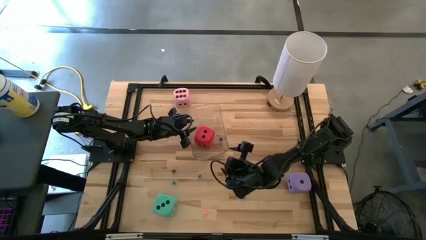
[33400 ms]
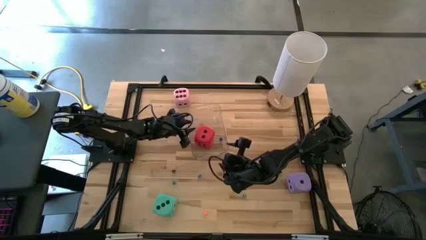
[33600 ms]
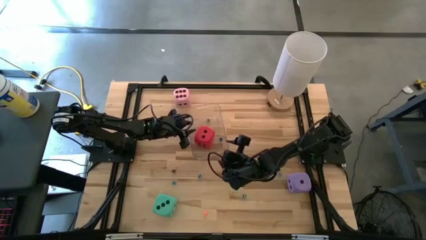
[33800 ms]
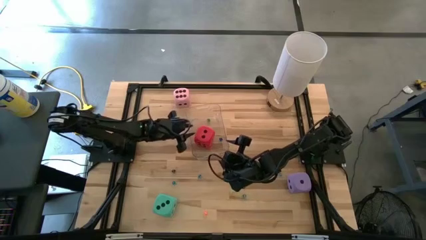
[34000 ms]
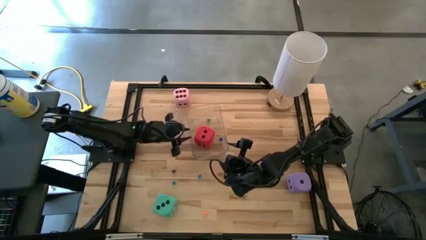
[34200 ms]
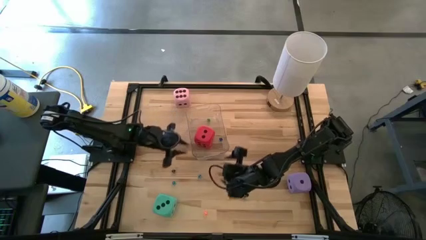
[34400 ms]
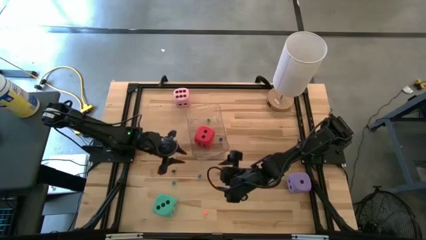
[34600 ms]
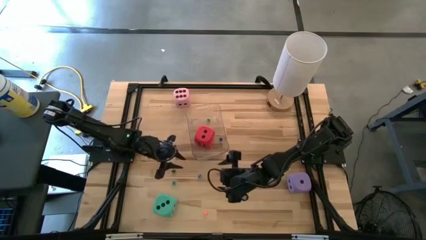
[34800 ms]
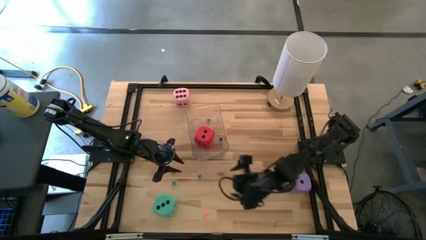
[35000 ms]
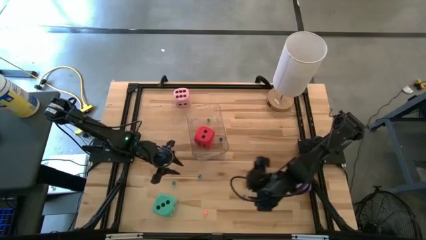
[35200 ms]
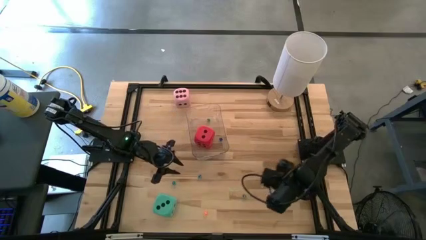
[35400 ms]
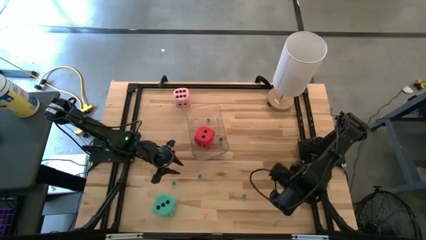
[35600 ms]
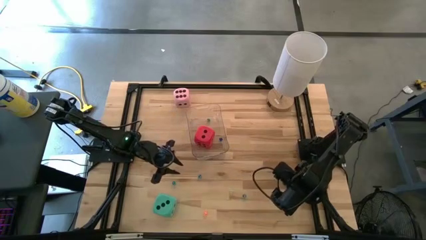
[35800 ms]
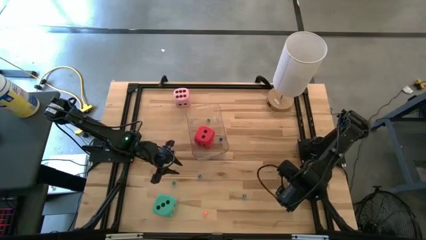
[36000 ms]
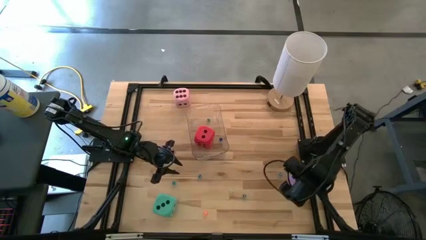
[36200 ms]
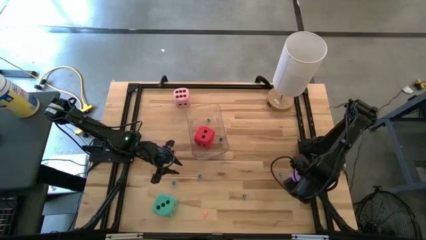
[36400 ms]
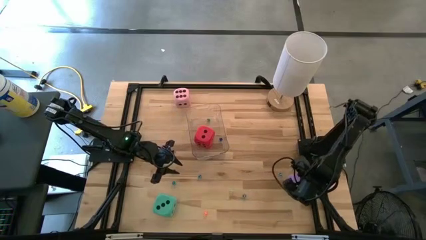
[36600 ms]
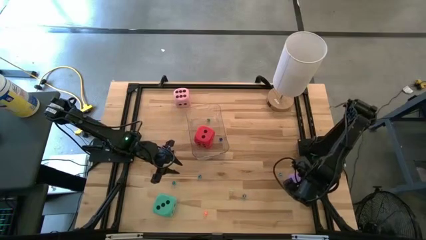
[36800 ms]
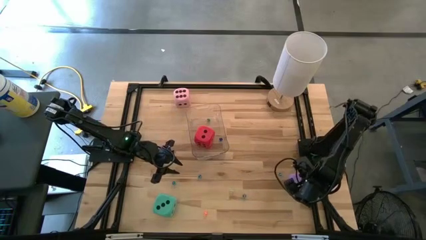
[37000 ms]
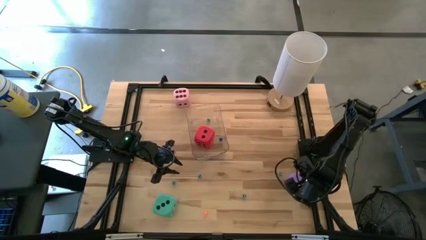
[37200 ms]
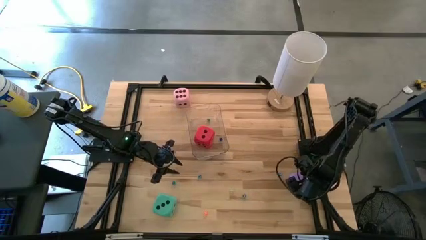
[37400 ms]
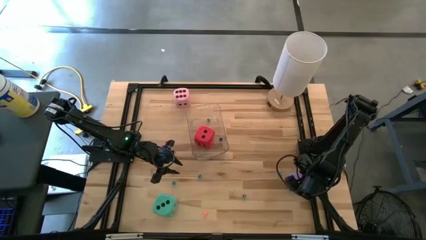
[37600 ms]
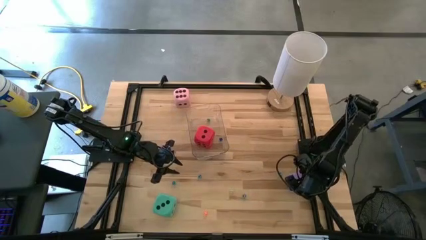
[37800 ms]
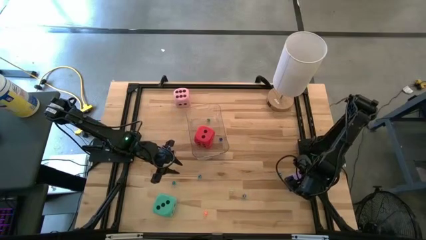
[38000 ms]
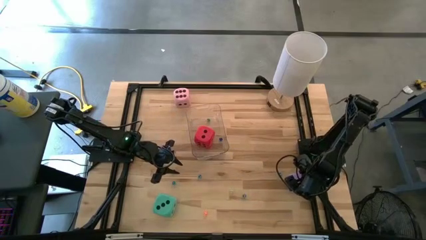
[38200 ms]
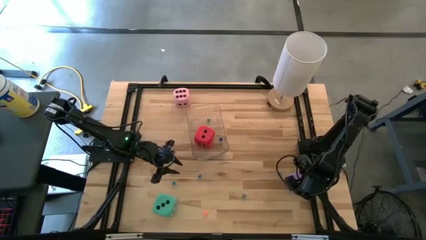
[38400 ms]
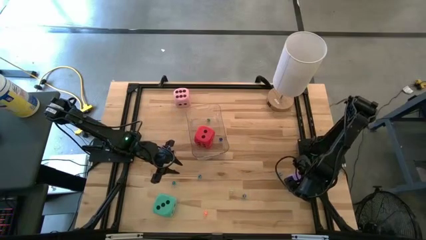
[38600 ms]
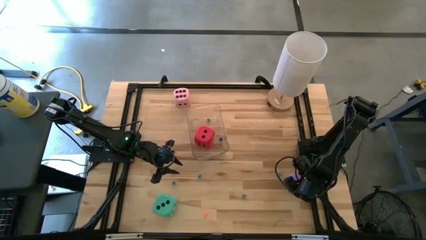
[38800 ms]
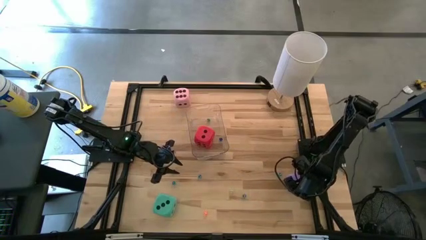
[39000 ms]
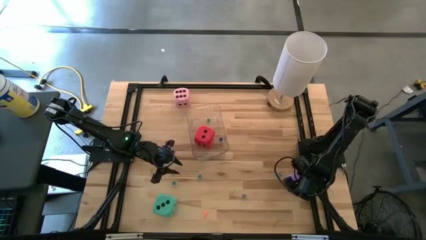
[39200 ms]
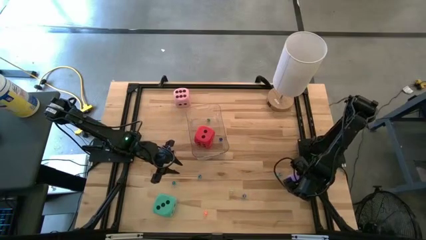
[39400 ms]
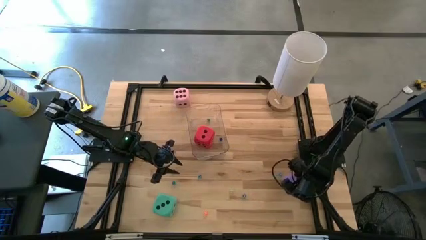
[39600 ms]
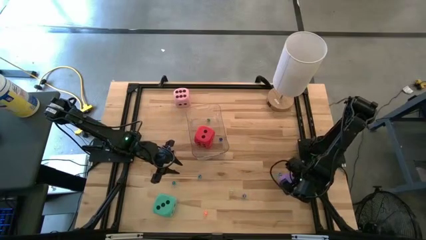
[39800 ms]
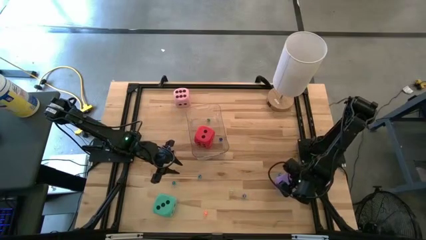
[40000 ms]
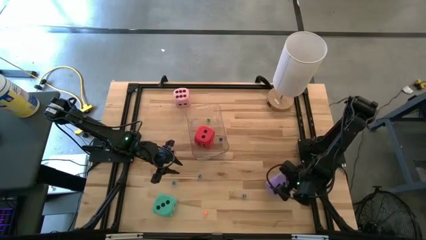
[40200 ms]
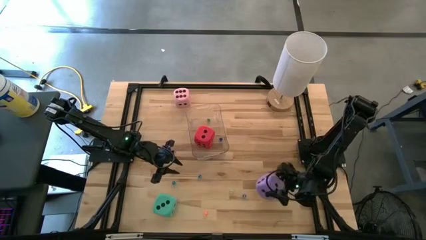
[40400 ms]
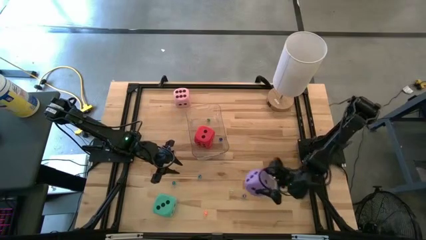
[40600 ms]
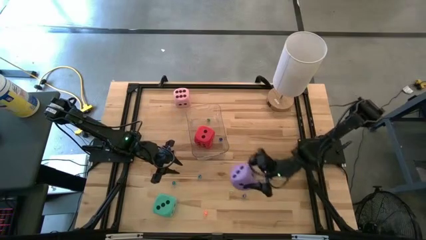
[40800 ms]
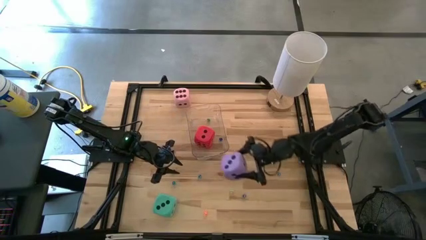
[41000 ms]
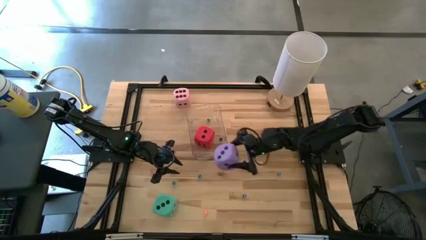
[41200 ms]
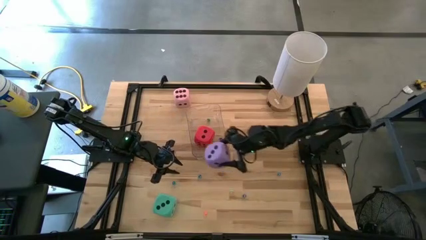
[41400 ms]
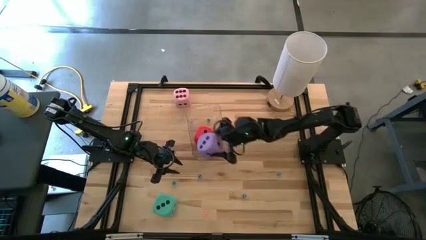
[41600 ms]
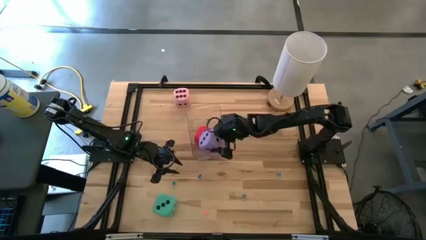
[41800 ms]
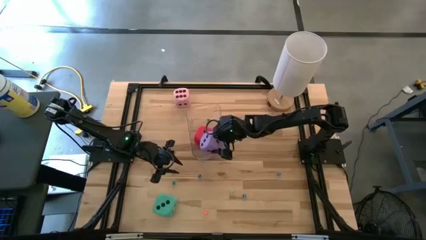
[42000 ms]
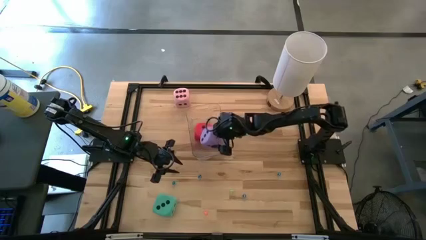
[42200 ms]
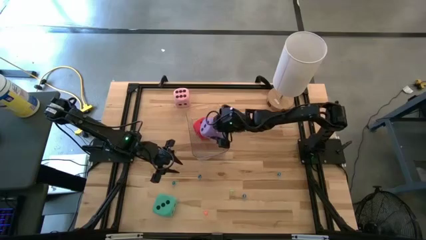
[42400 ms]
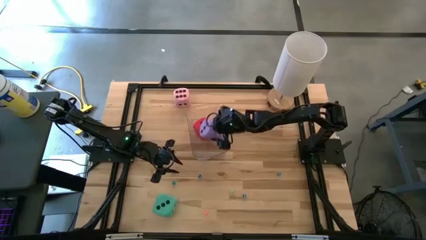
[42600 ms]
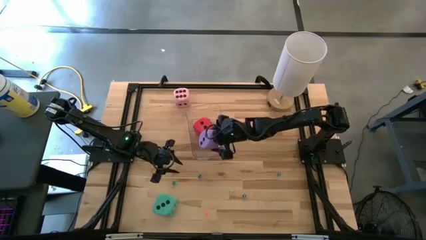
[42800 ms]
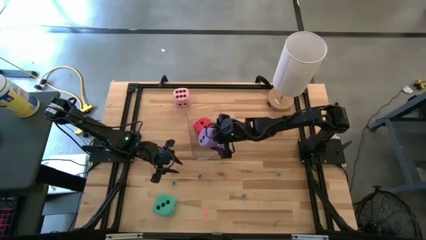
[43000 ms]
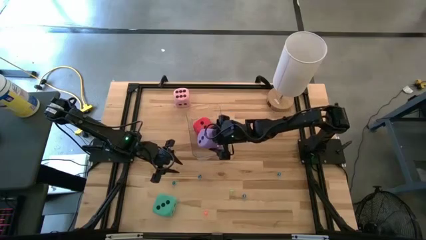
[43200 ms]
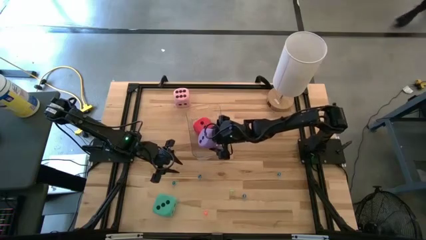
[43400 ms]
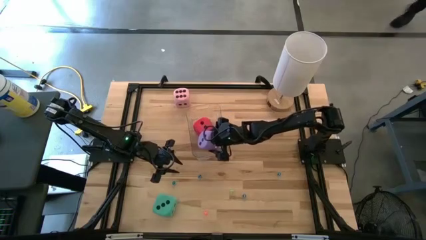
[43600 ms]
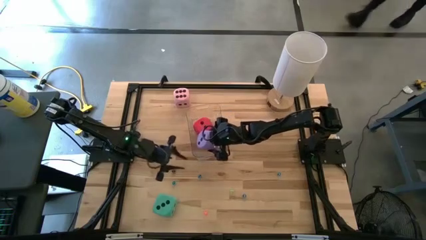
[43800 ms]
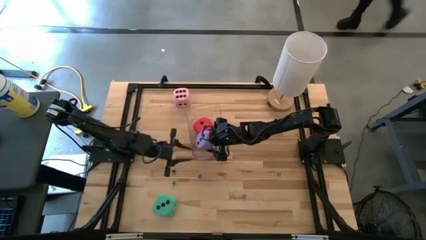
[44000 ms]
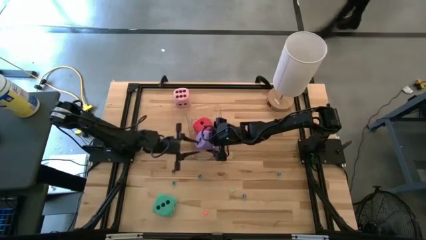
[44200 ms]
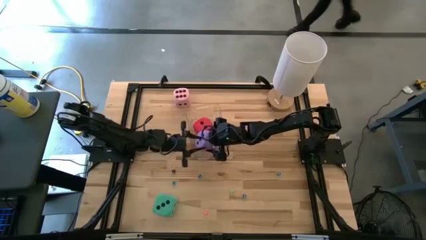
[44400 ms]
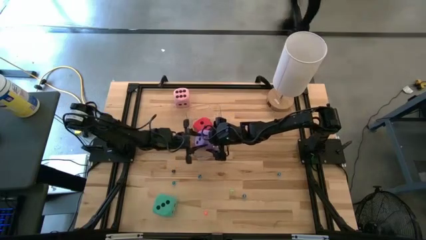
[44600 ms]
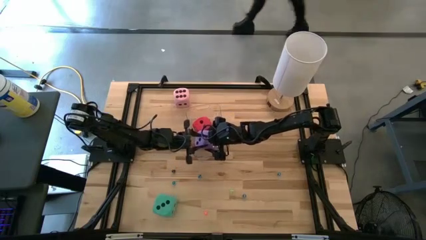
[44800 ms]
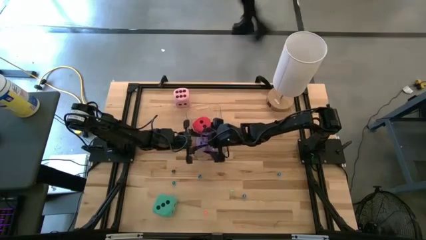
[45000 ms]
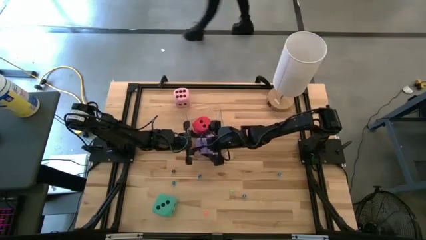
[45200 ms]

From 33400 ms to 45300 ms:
Task: Pick & Place Dice
Put the large purple die into the transparent bin
